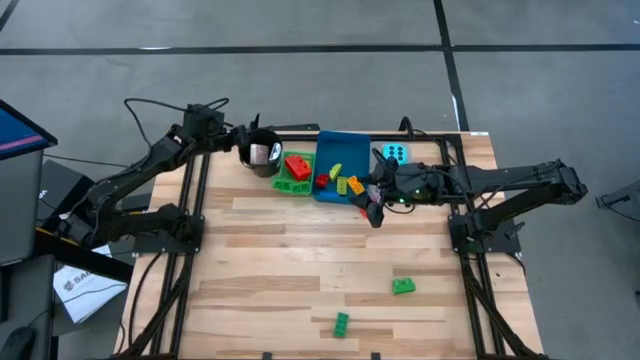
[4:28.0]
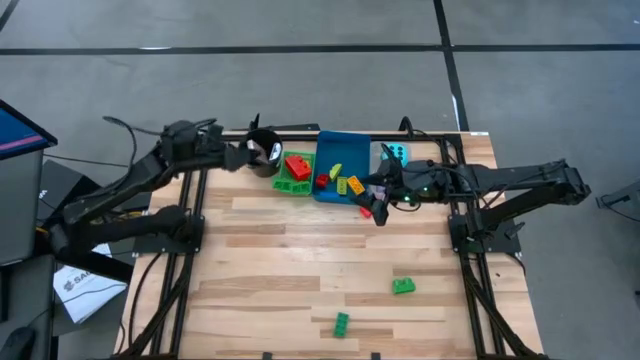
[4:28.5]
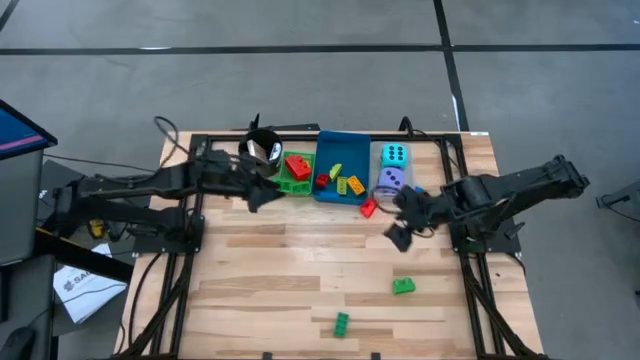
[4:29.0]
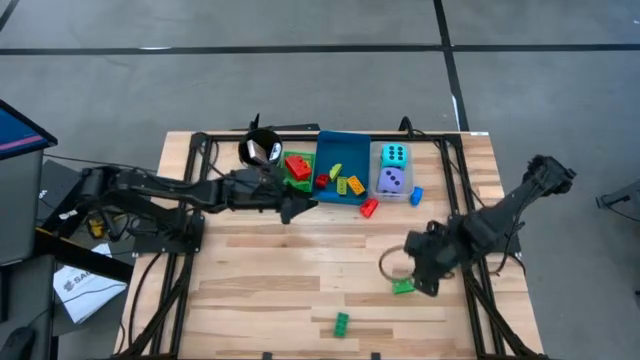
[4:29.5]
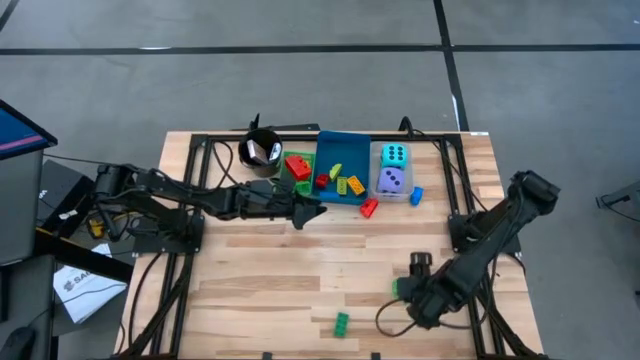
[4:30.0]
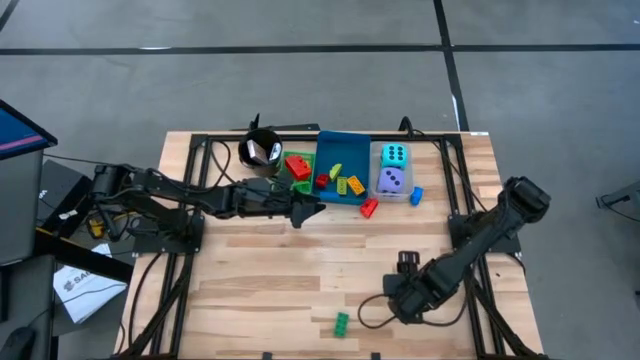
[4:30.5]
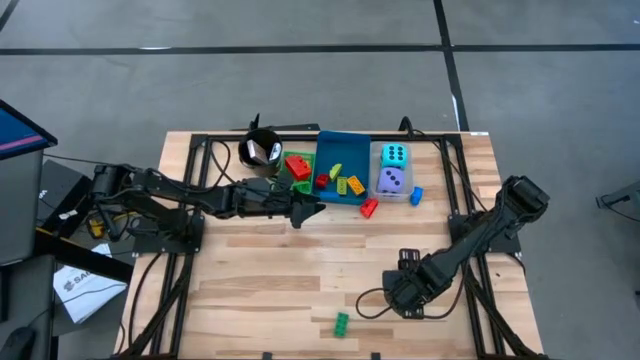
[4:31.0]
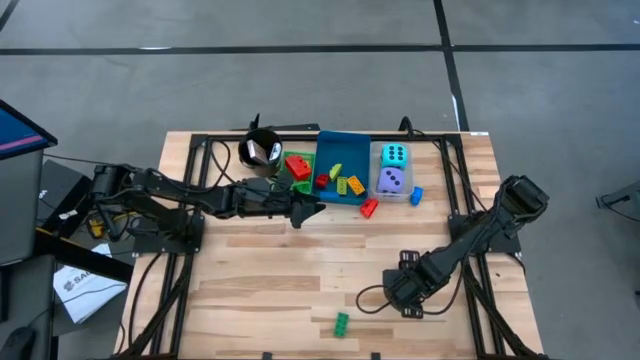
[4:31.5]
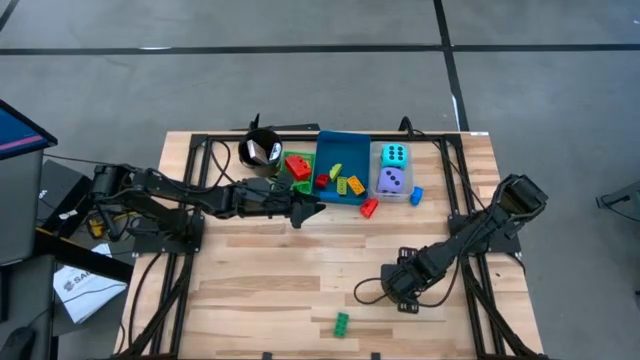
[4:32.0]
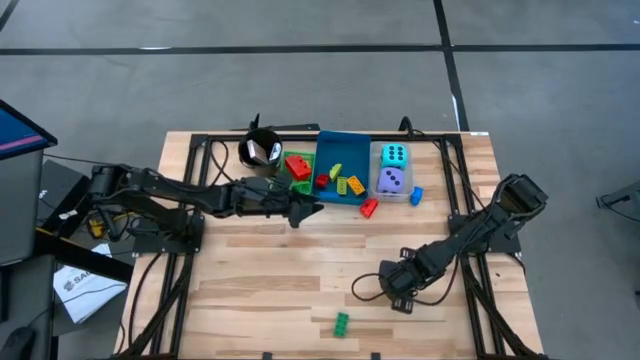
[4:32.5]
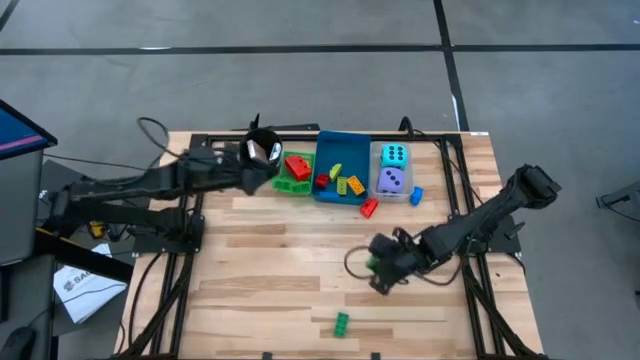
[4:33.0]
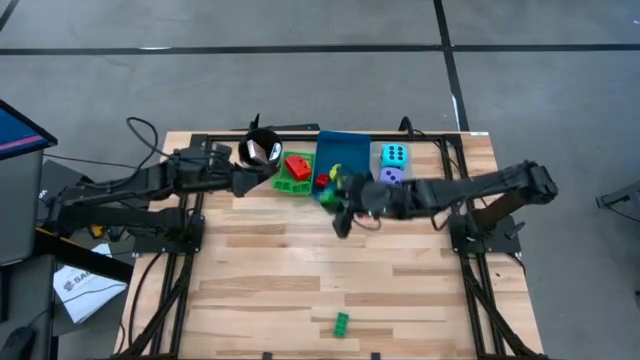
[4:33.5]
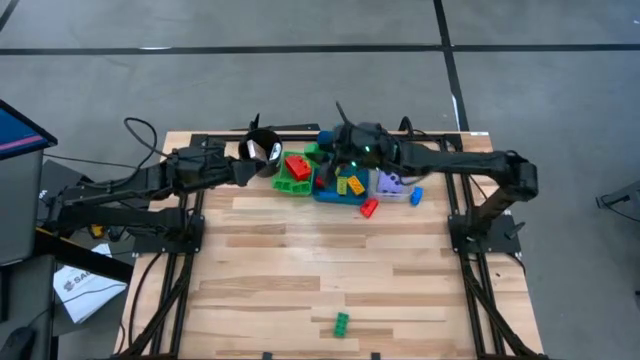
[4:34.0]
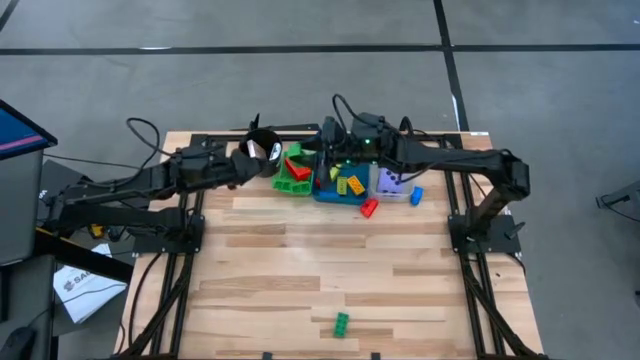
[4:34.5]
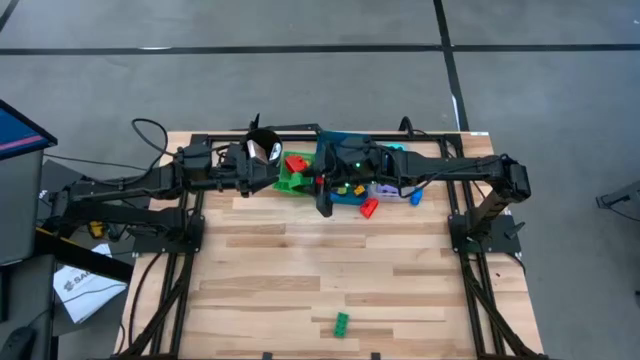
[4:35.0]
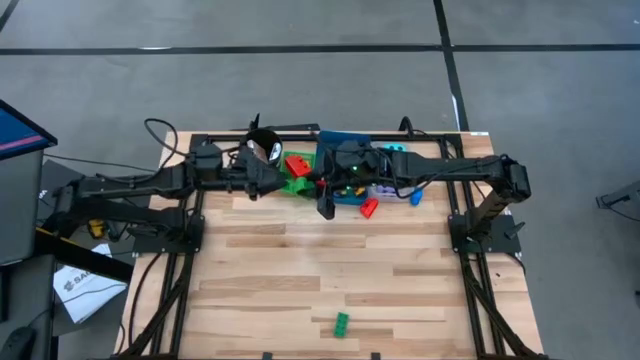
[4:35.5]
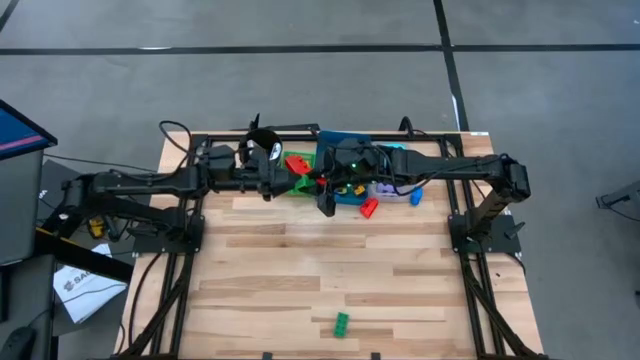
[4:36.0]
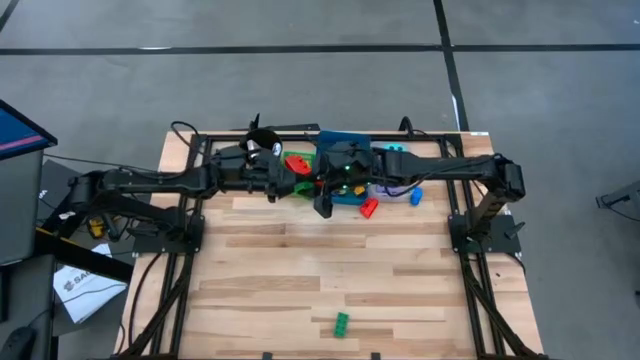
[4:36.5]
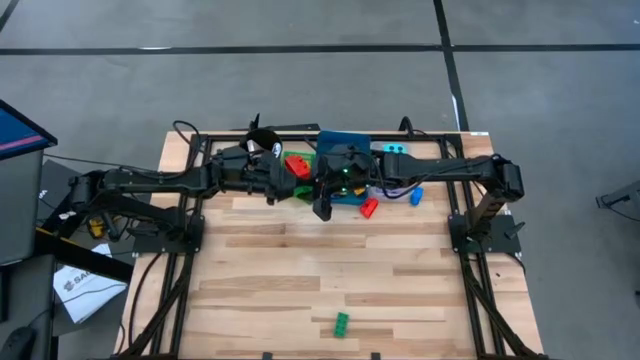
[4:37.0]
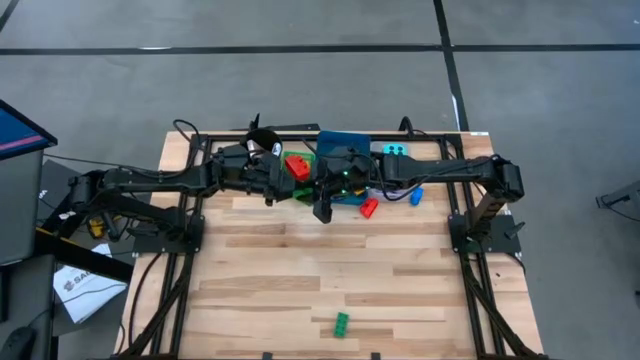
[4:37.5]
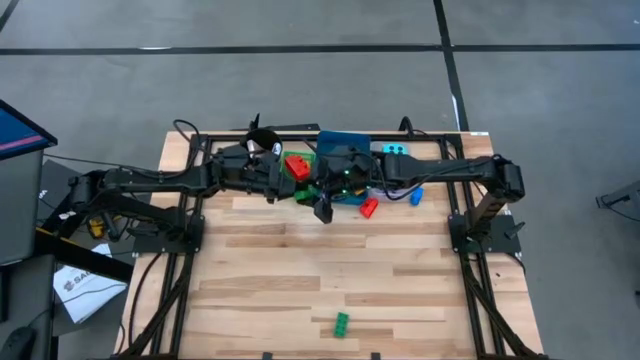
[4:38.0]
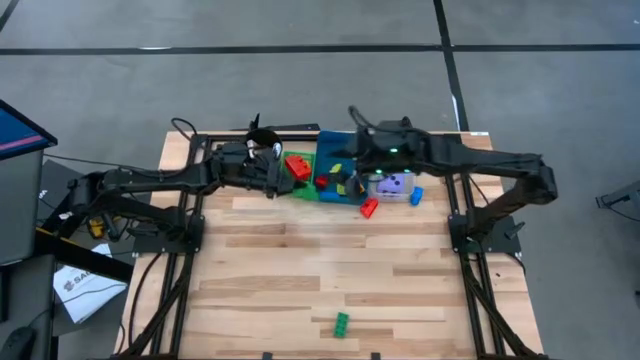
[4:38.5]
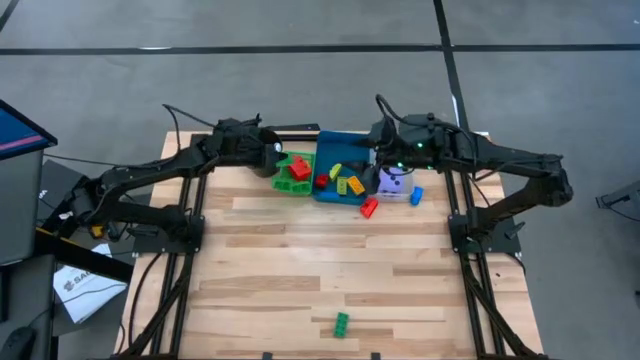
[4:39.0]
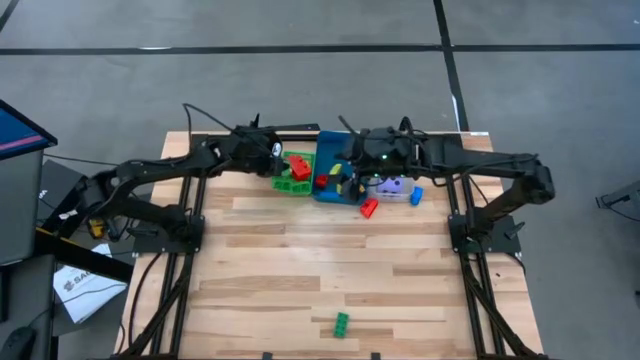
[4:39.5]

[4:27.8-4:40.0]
Task: Pick & Place Toys
Put the large stud green game piece into the green bin

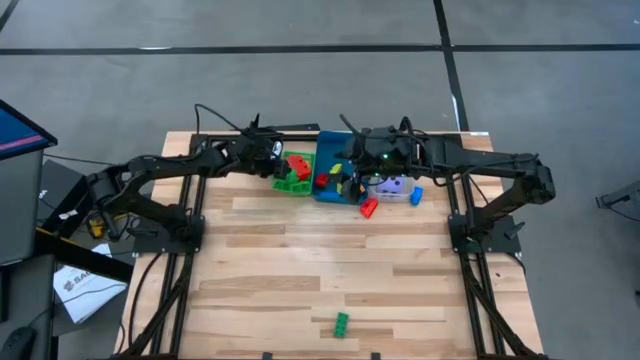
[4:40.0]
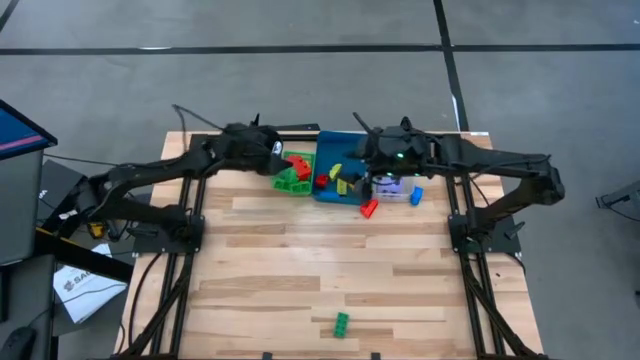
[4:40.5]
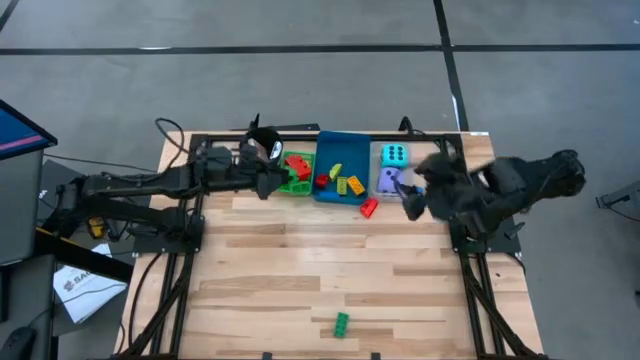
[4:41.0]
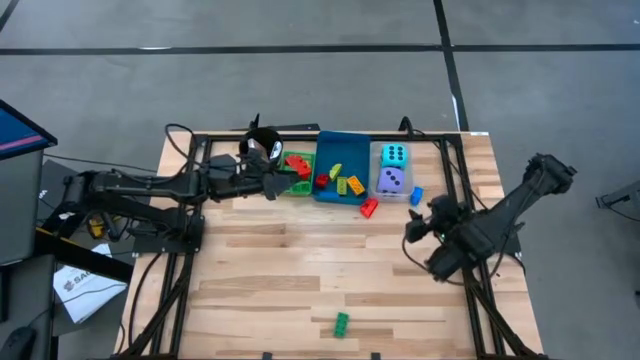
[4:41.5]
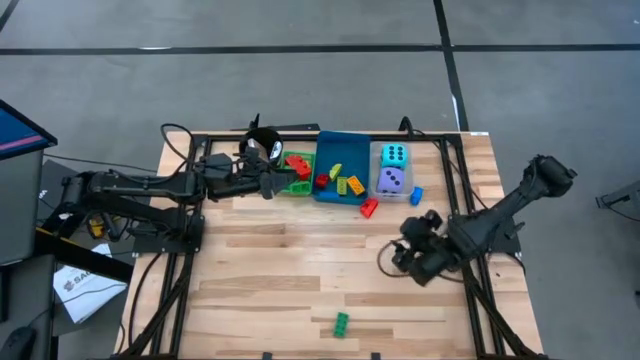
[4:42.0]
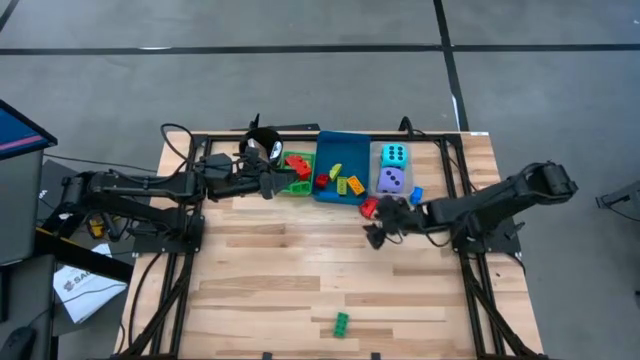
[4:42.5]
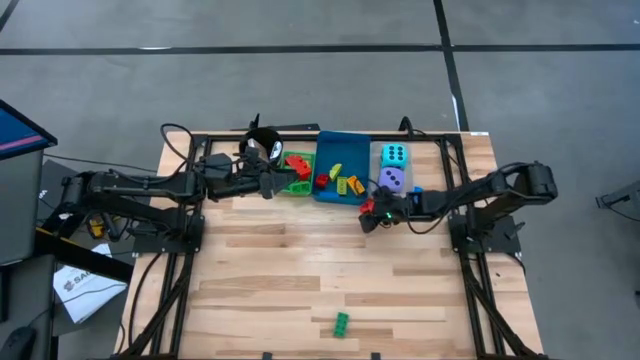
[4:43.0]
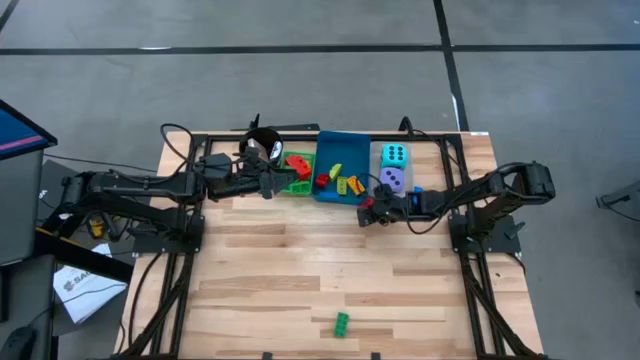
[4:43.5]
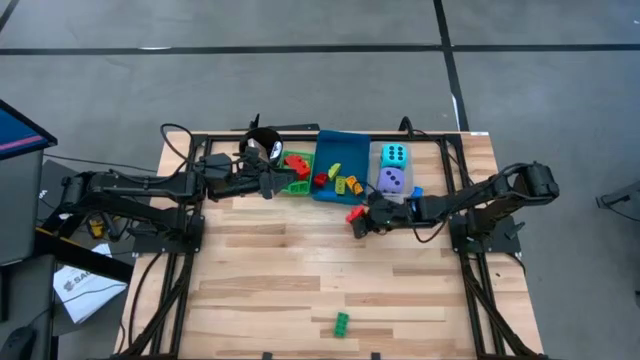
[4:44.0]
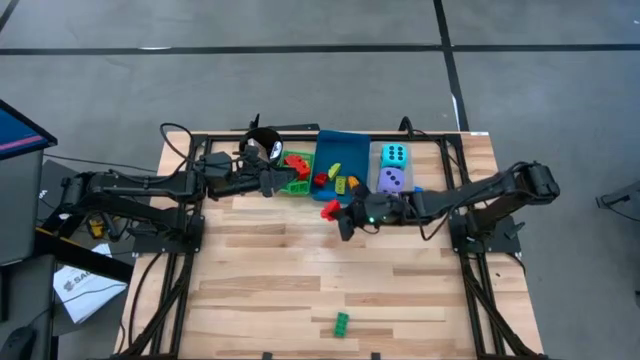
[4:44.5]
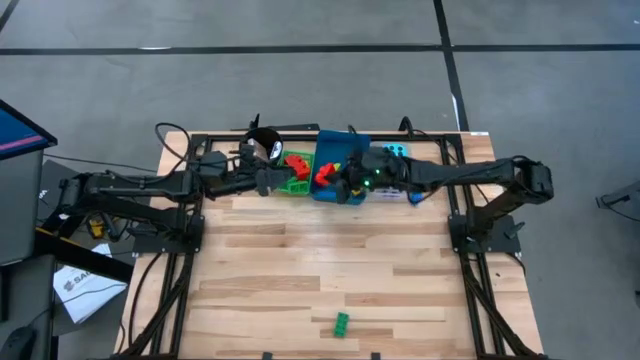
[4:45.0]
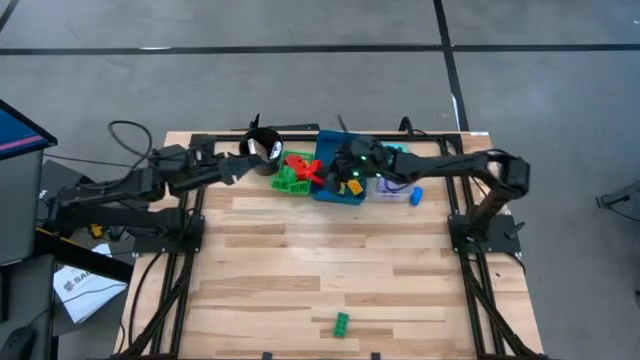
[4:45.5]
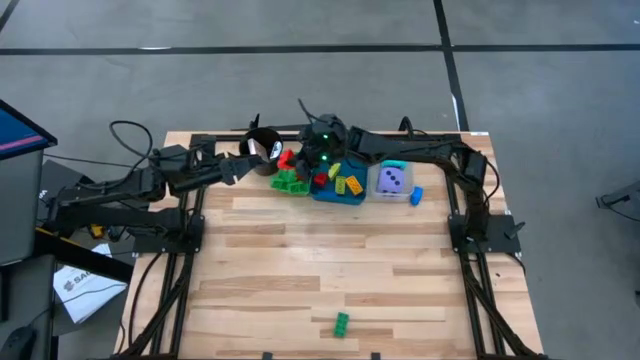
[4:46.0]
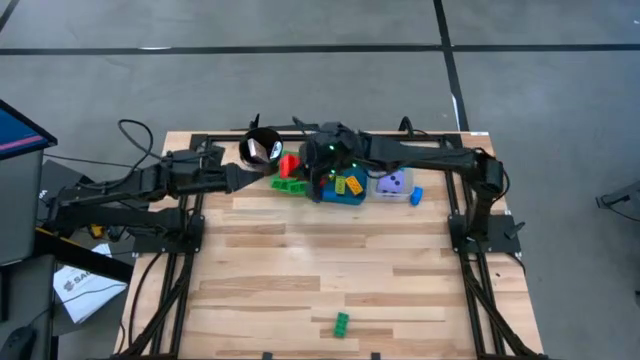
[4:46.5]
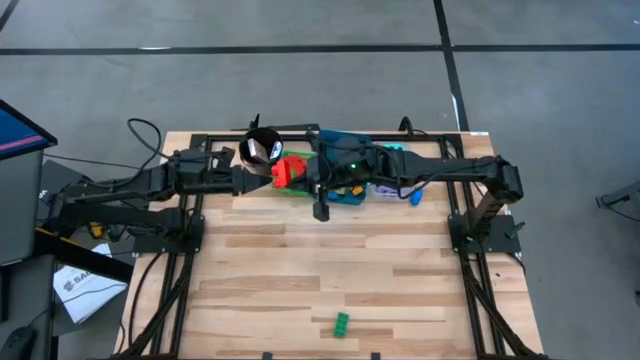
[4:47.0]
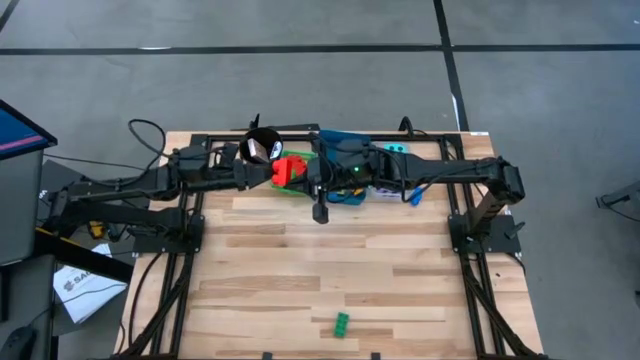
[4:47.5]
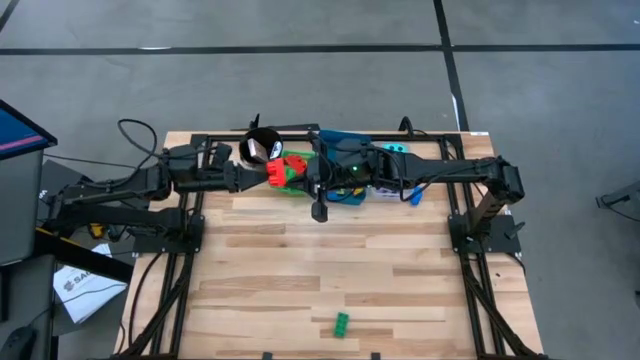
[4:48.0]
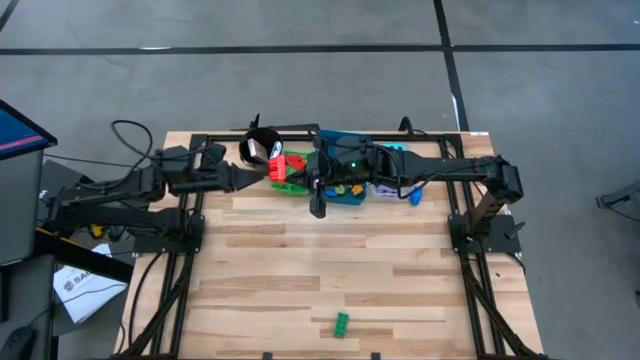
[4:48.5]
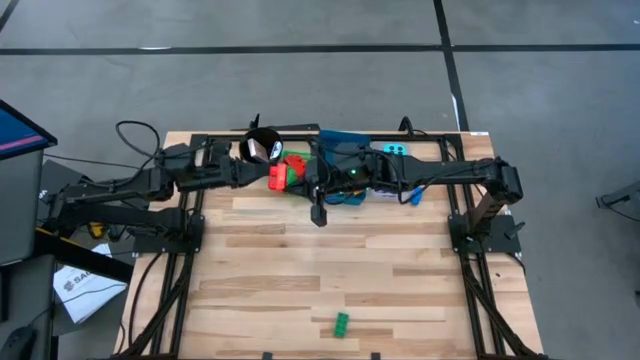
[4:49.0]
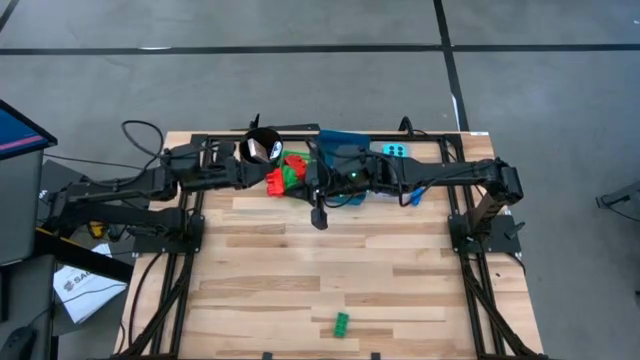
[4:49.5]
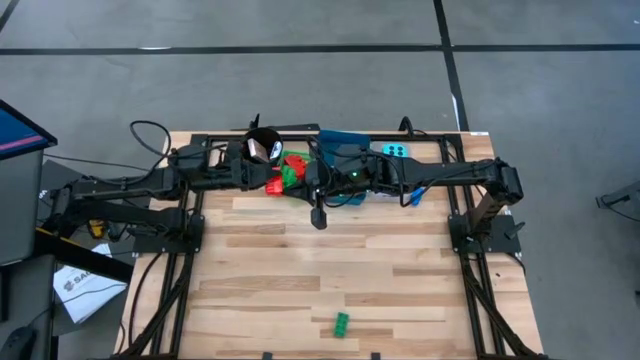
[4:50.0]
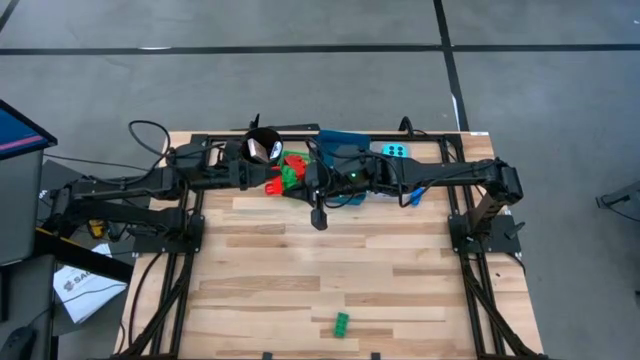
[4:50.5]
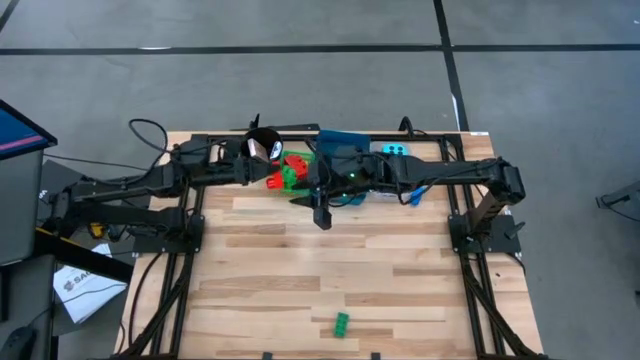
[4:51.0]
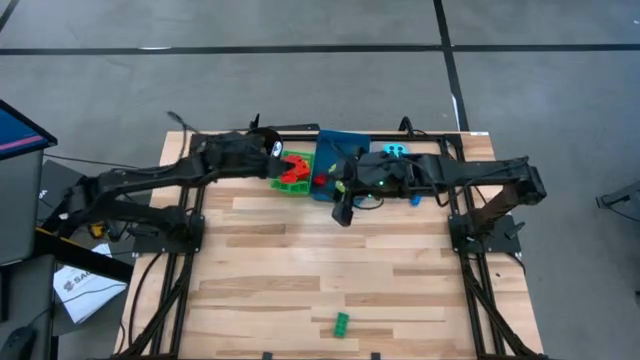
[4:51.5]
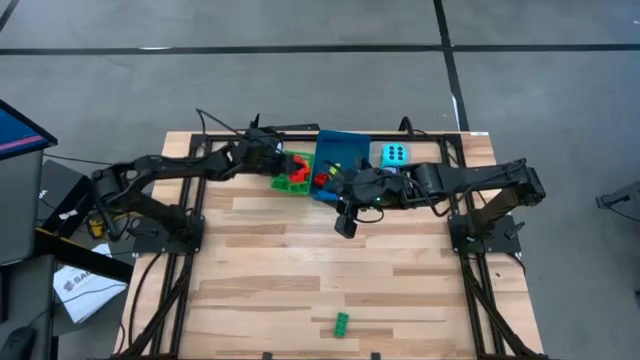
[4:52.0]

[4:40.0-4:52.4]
Put the large stud red game piece into the green bin
